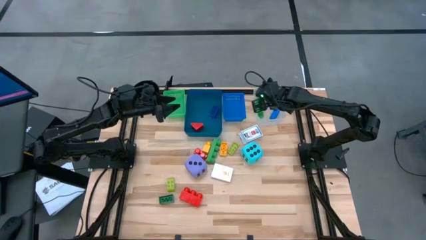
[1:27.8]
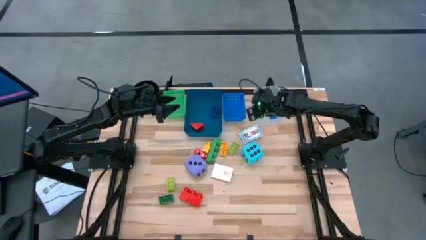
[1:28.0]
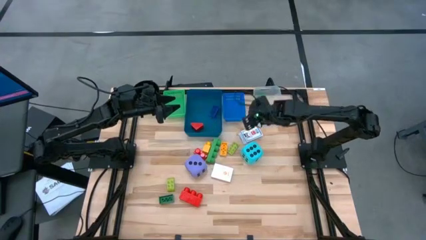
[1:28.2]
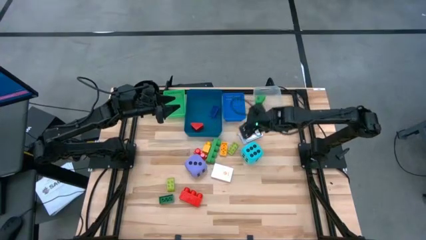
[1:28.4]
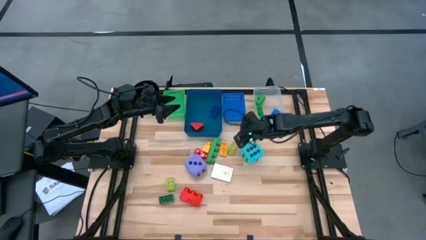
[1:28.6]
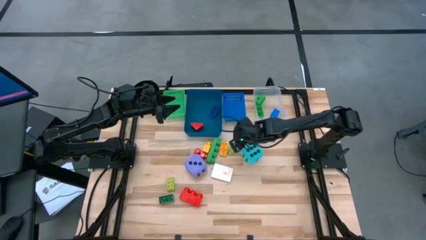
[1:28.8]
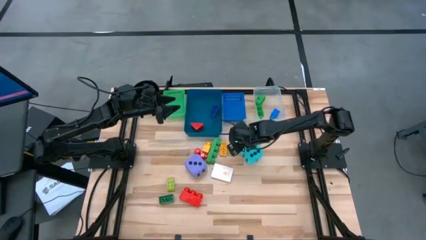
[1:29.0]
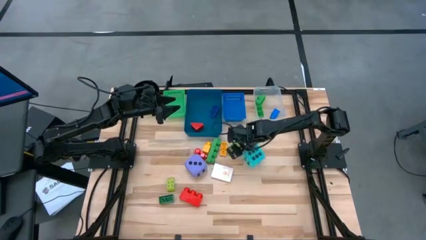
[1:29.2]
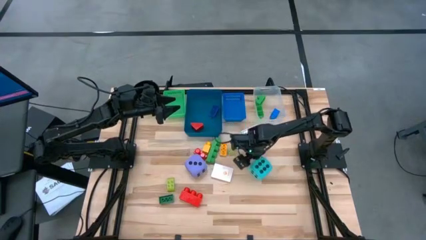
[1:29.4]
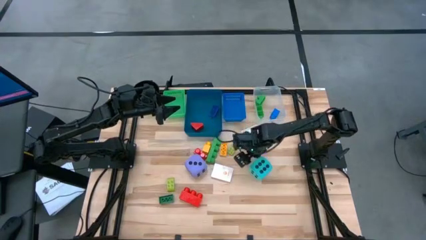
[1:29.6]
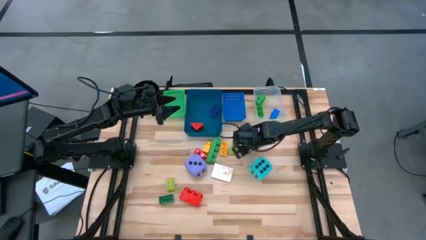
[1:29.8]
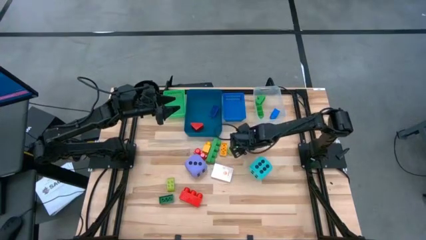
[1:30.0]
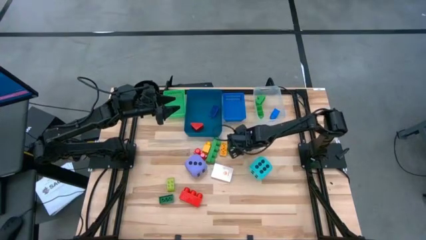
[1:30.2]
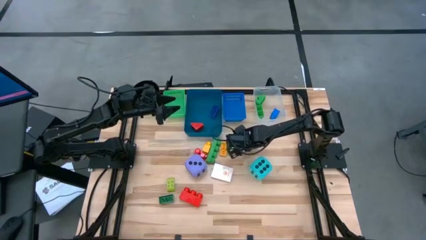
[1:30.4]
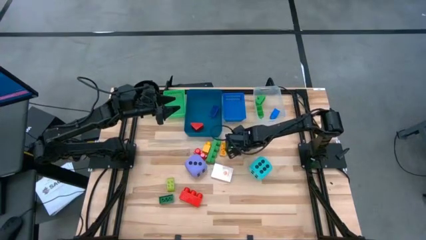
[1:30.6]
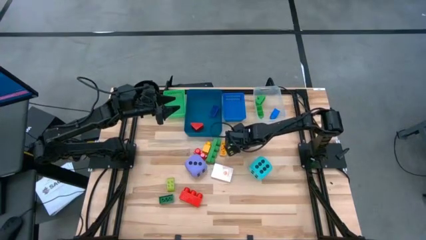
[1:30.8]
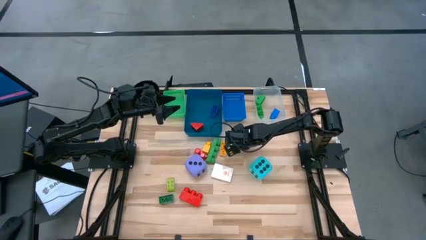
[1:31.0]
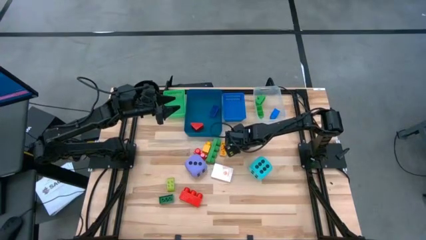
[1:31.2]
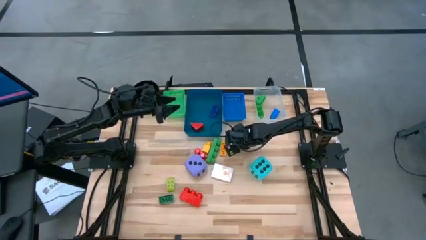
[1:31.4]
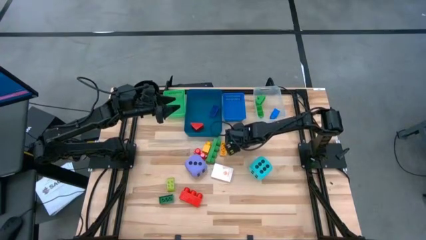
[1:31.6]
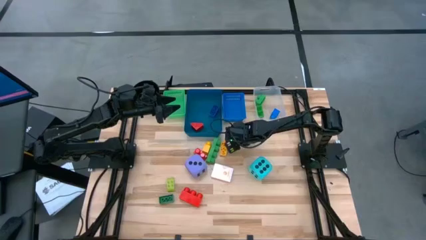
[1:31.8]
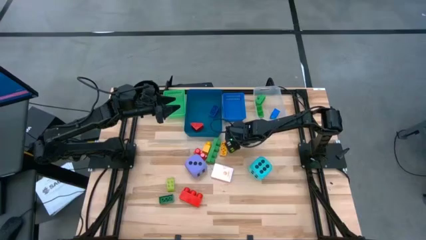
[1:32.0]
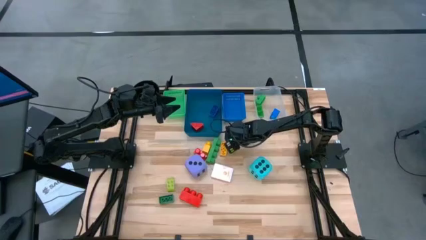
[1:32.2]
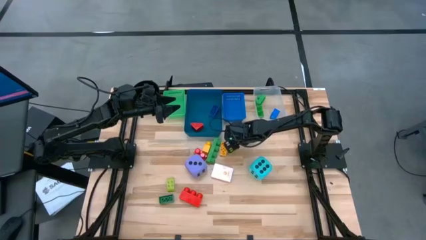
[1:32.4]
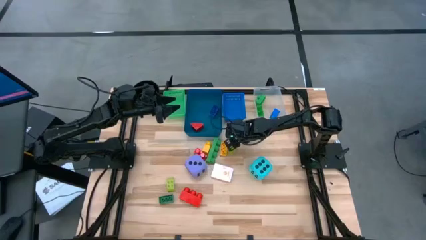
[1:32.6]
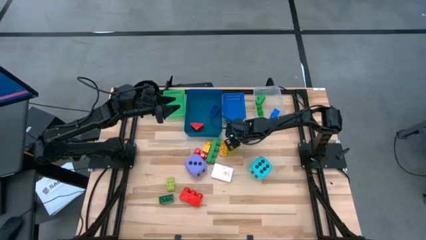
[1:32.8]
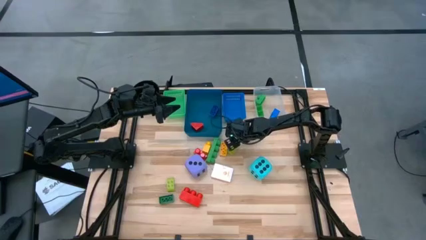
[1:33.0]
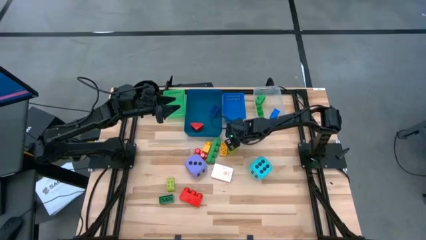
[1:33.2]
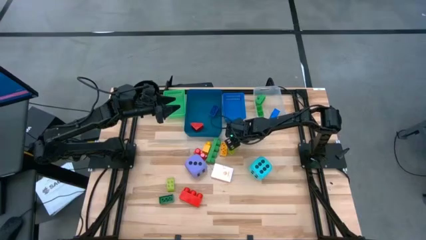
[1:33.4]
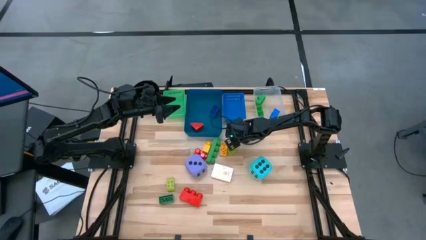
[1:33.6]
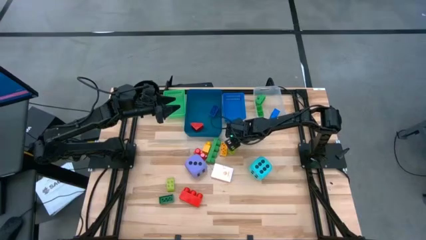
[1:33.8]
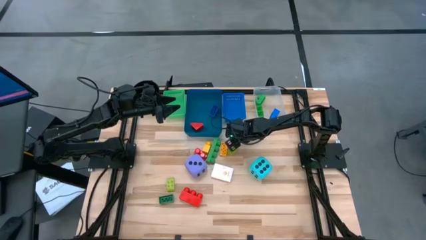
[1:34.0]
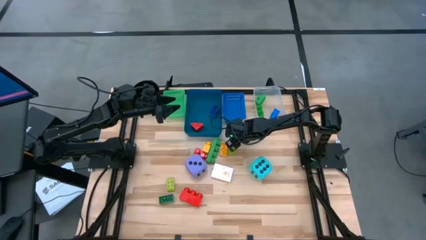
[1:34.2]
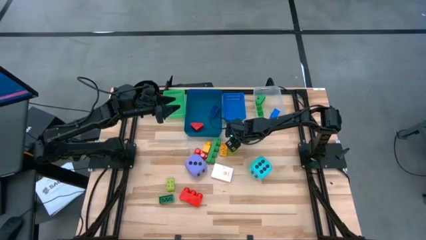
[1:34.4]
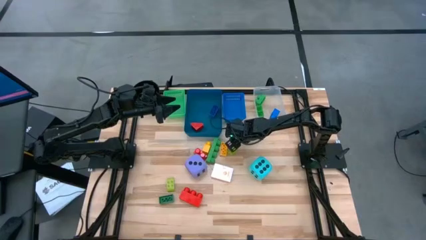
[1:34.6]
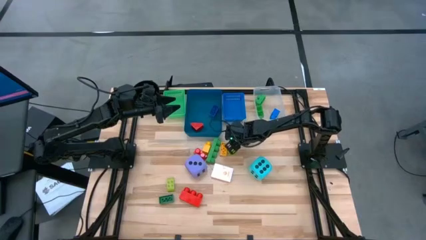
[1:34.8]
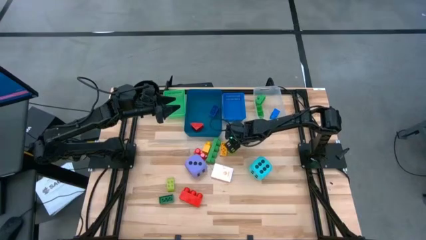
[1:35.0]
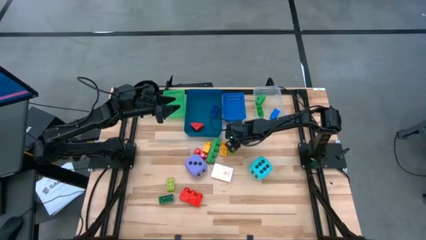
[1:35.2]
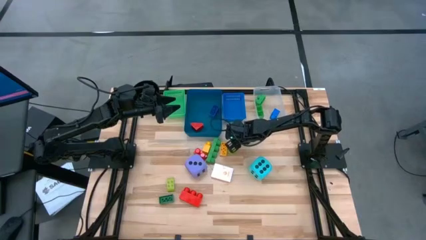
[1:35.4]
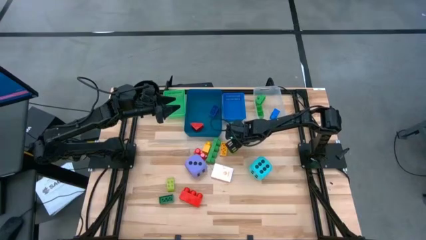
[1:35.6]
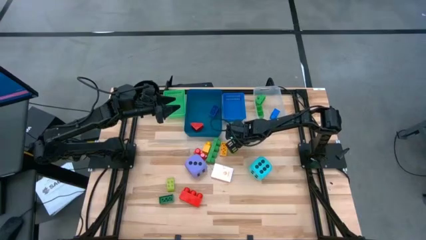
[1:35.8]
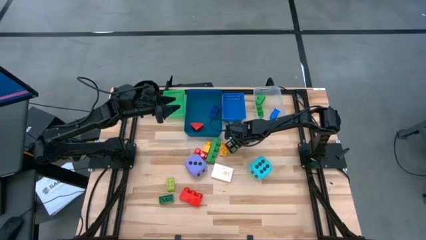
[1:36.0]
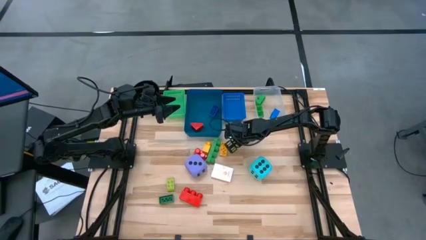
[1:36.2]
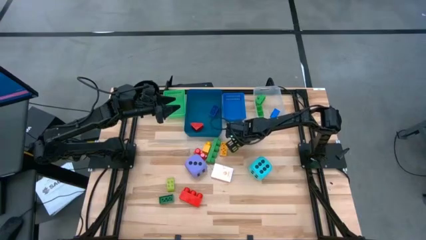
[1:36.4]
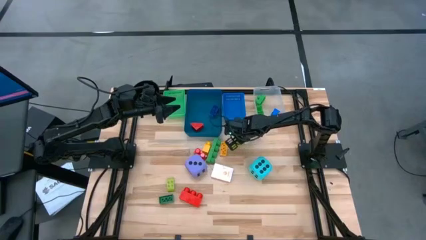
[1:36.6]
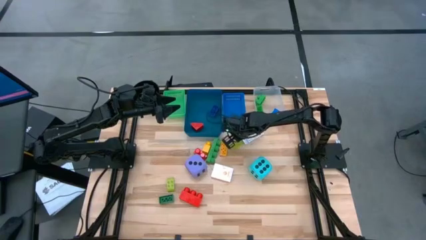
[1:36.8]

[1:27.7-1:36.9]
Task: Pick & Place Toys
Put the blue game card into the green bin

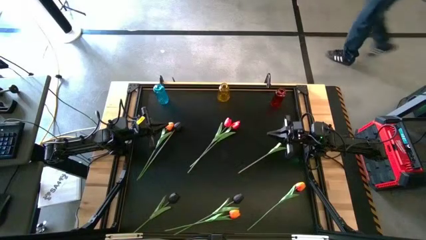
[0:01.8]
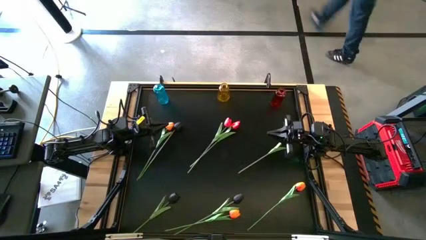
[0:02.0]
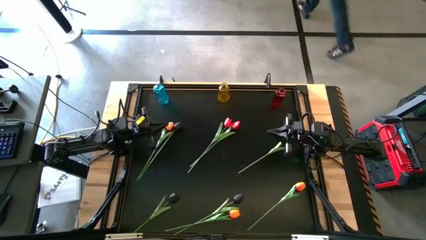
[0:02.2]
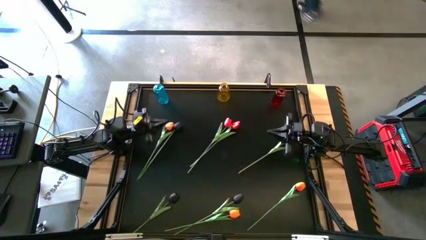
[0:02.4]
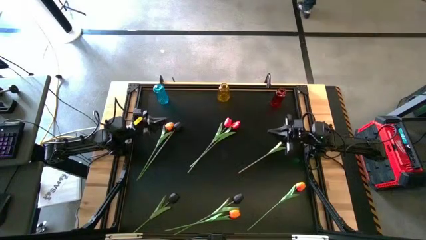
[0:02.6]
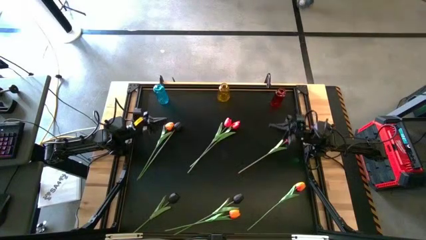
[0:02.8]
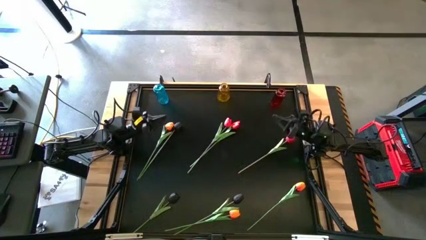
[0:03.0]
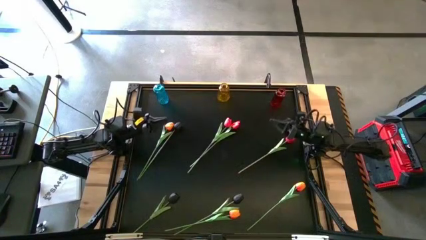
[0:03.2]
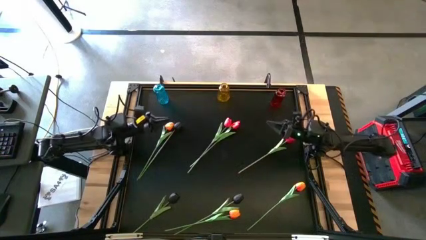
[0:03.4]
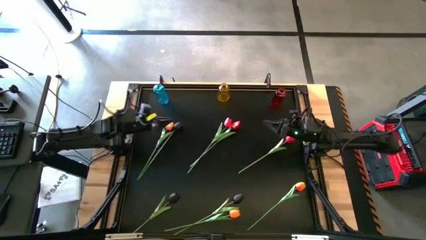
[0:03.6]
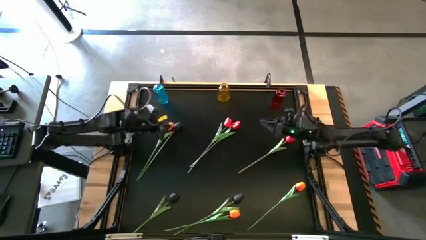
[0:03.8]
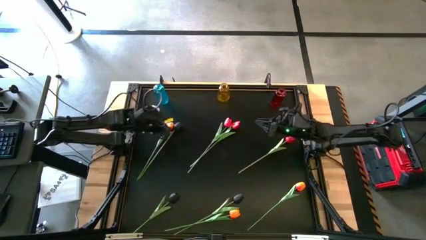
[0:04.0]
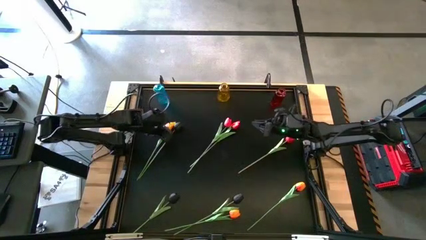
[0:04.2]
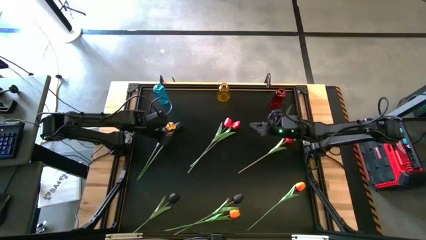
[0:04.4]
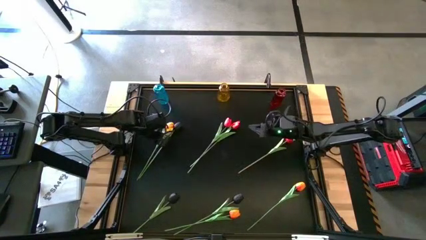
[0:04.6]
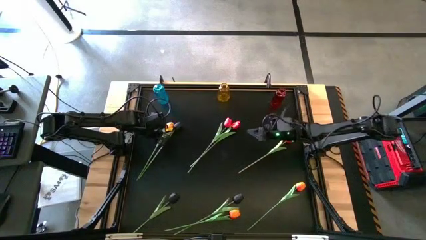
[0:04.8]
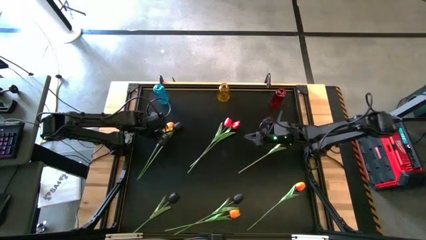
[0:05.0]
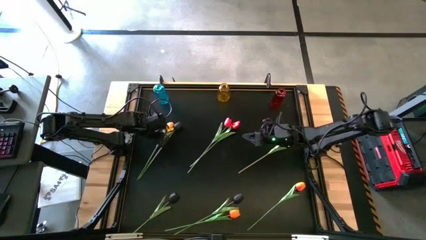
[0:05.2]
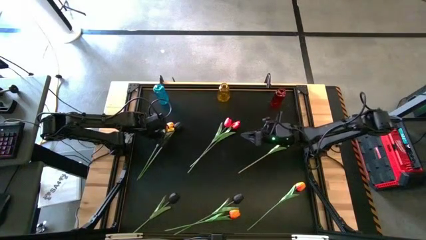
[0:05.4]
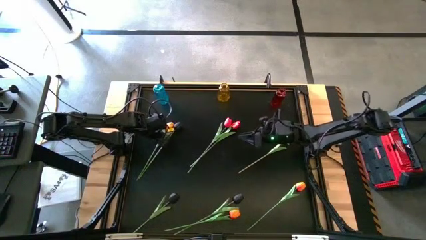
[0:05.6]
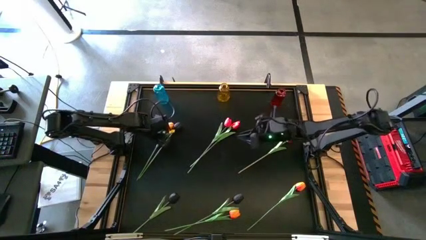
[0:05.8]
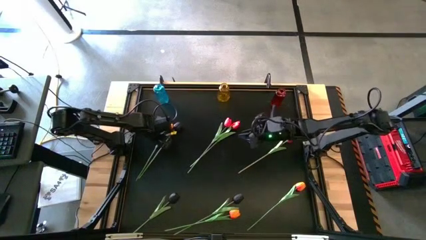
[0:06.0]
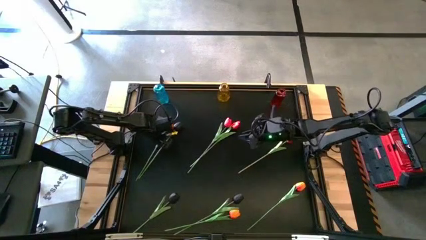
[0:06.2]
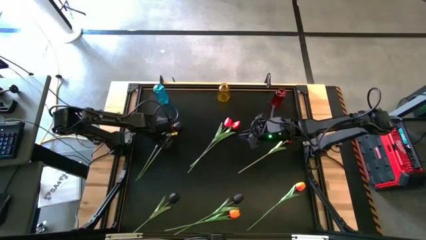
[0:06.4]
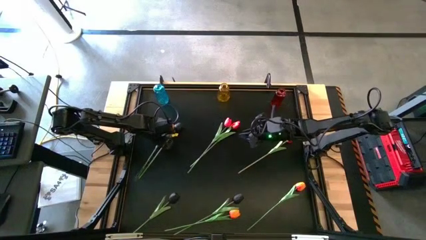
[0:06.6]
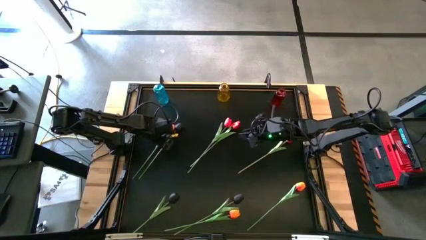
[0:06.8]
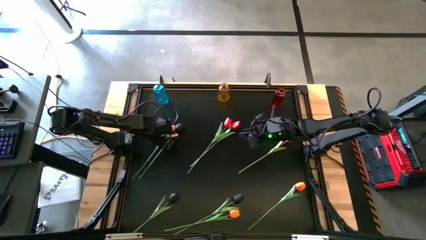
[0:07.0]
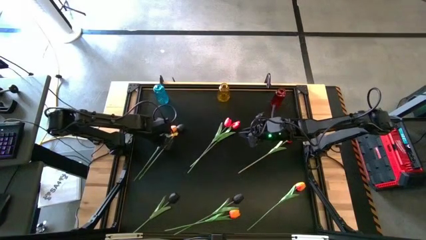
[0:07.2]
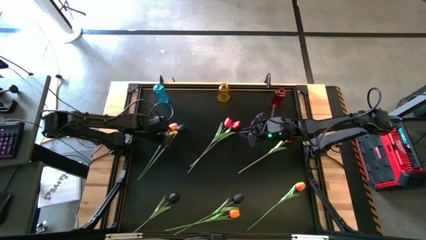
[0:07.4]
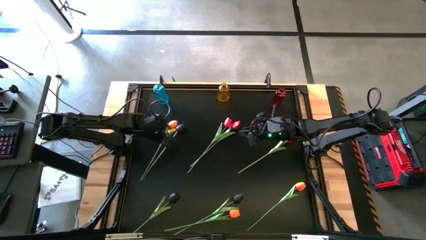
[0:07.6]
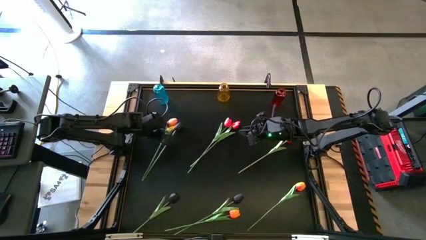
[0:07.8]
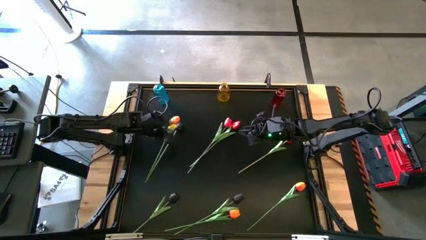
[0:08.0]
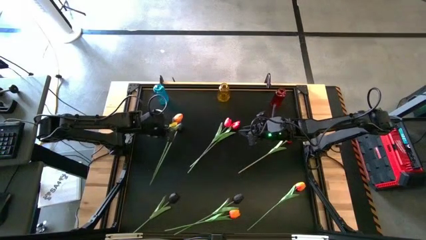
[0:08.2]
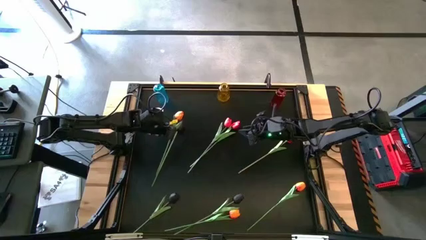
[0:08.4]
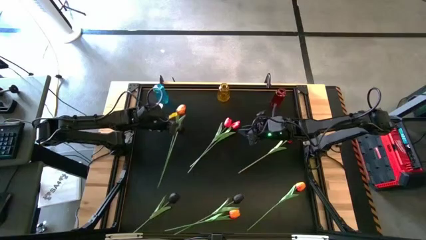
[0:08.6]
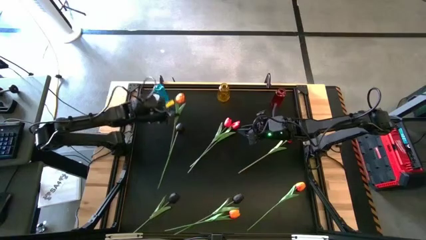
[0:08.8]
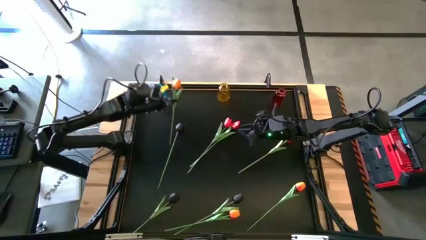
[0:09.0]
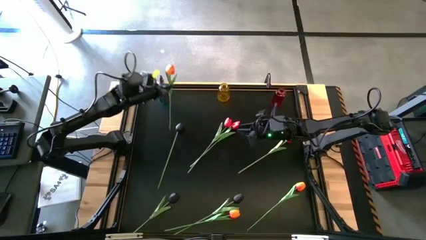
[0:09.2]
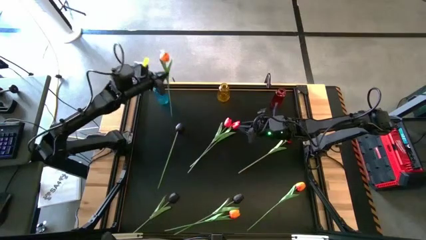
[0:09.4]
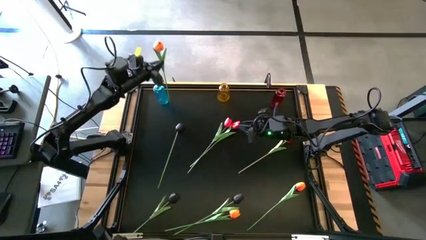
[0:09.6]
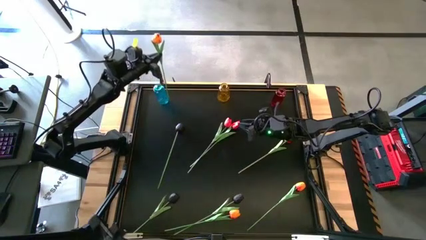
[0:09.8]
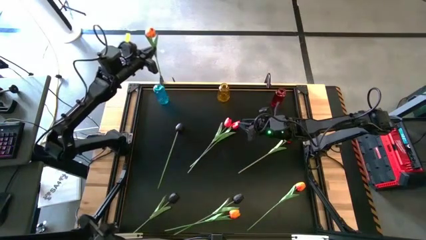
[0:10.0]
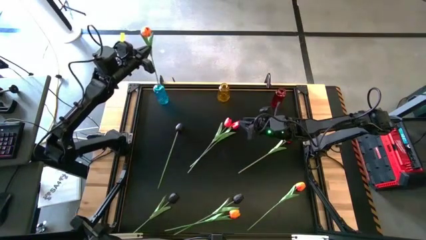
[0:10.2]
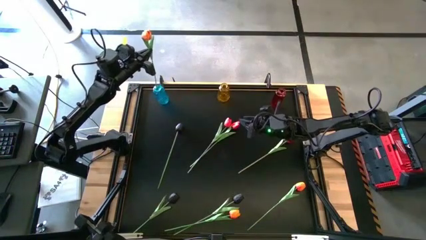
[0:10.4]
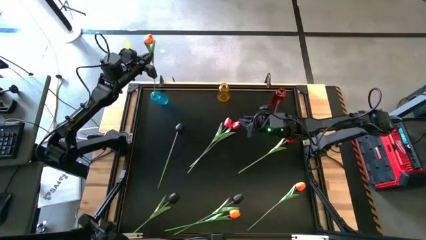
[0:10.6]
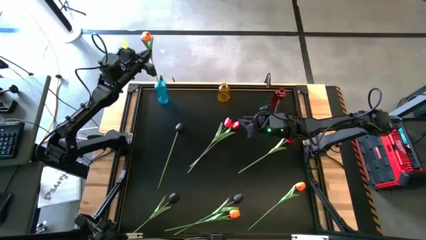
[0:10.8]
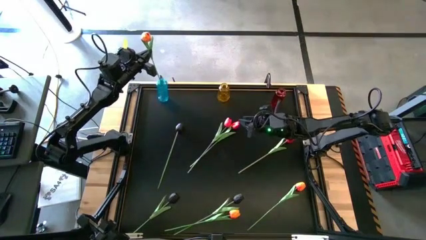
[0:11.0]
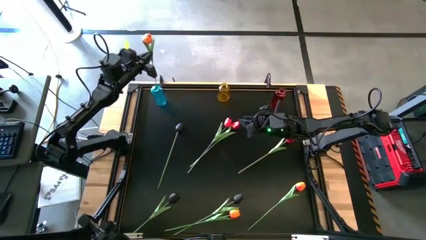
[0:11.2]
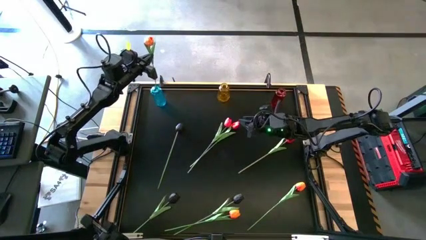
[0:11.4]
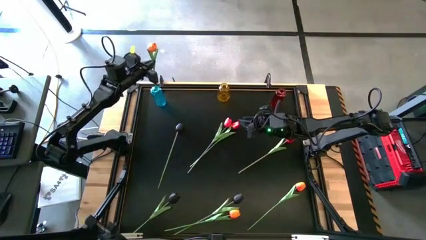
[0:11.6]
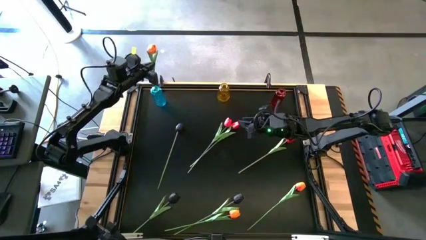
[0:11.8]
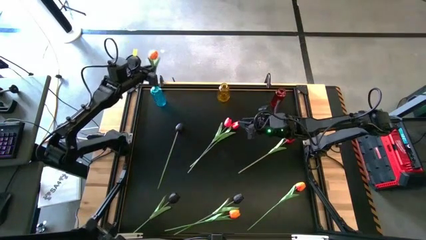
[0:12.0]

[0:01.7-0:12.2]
Task: Sort flowers into vase by color
Put the top left orange flower into the blue vase
